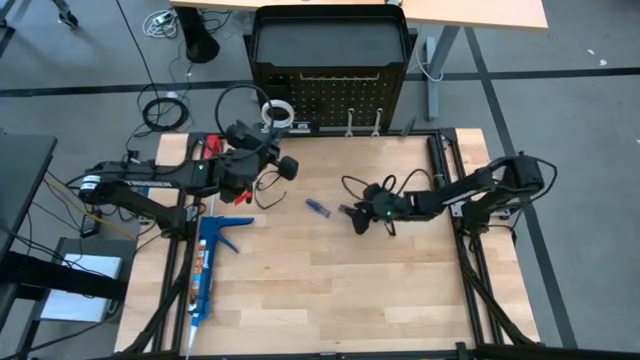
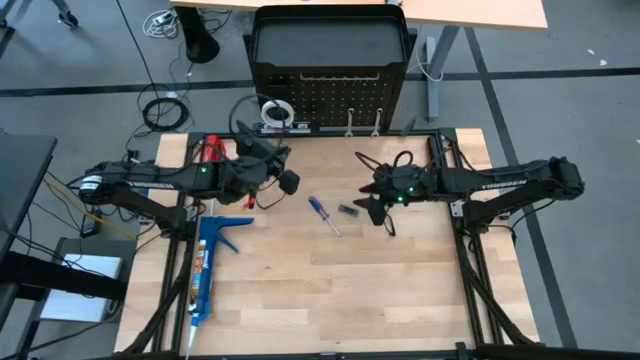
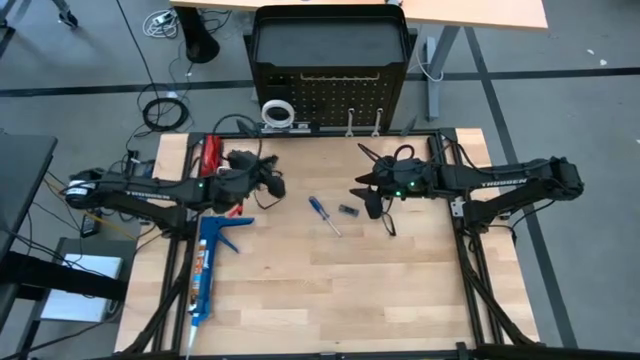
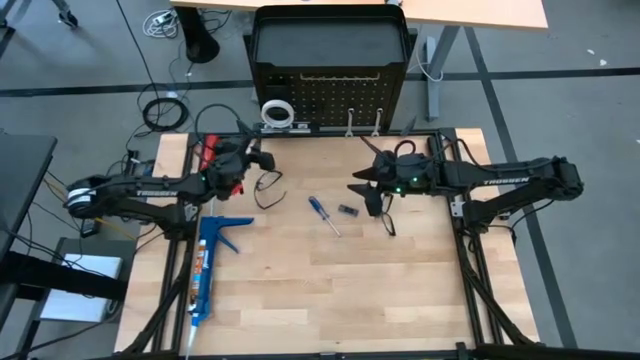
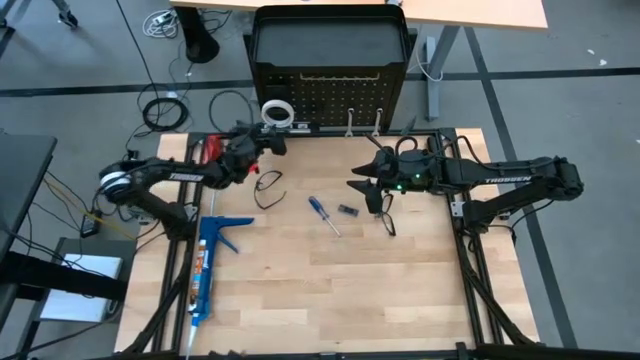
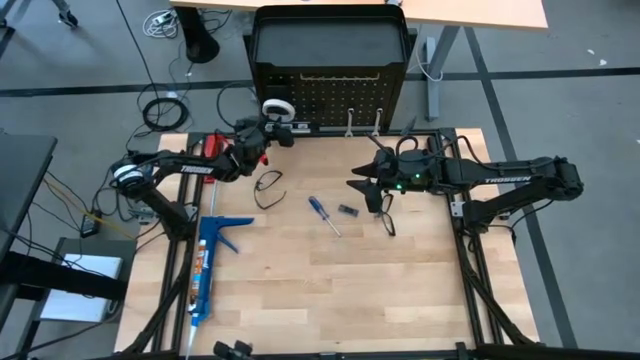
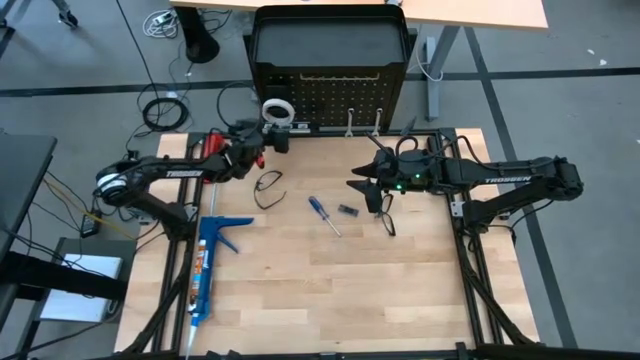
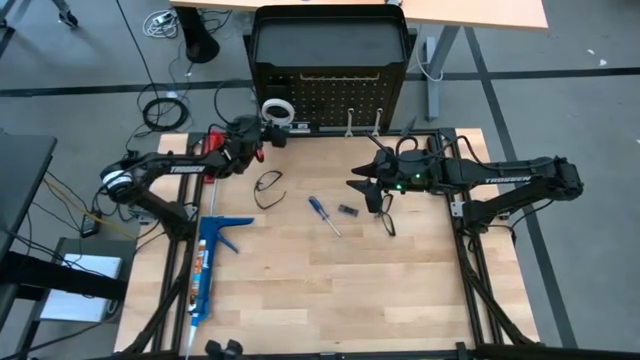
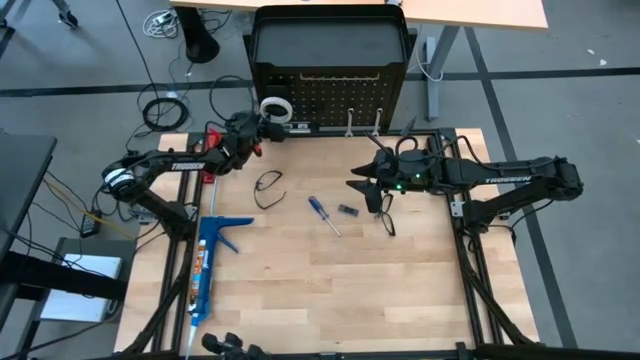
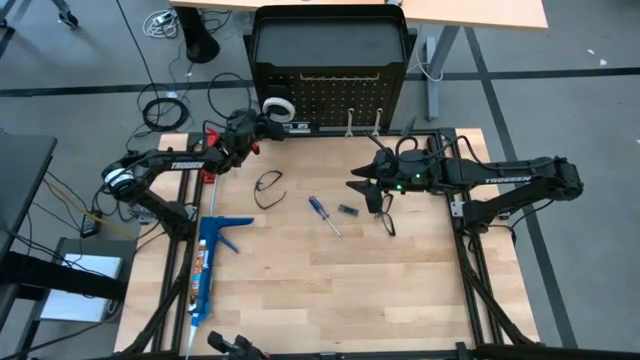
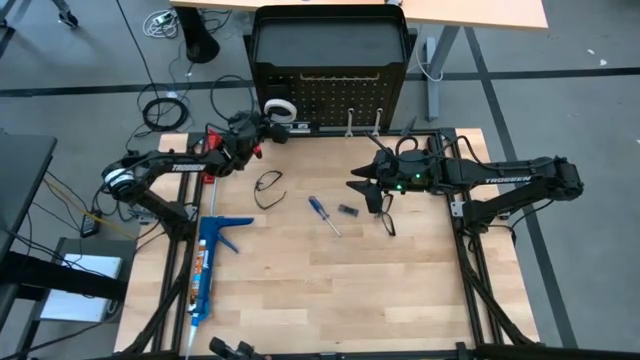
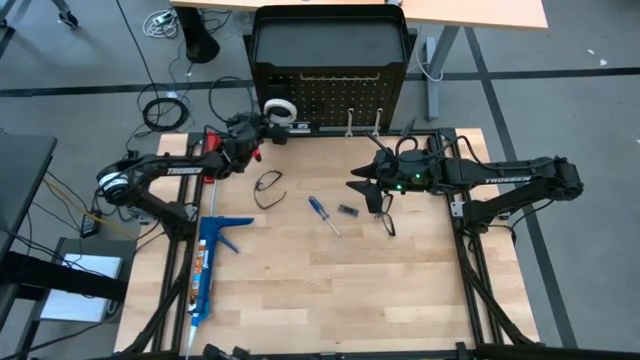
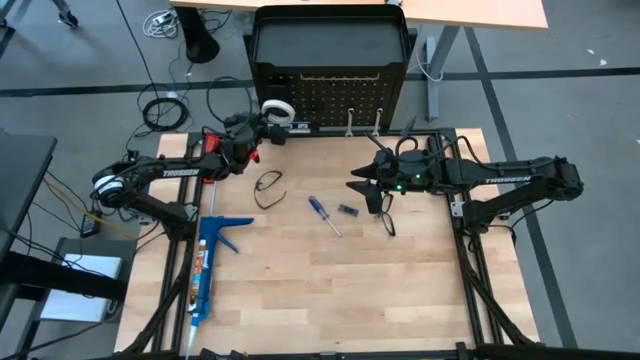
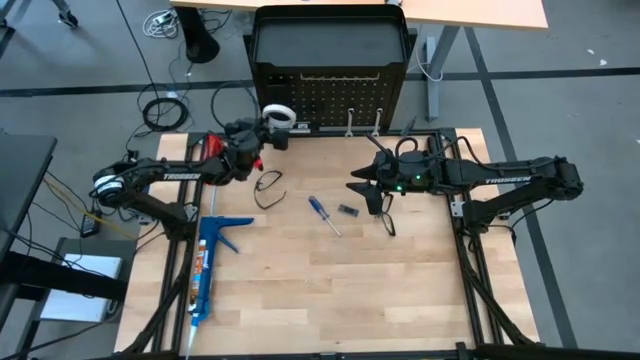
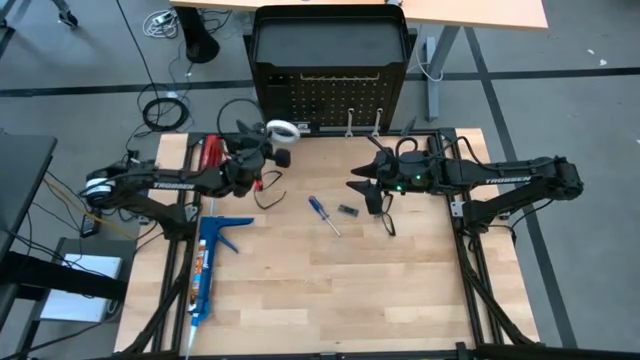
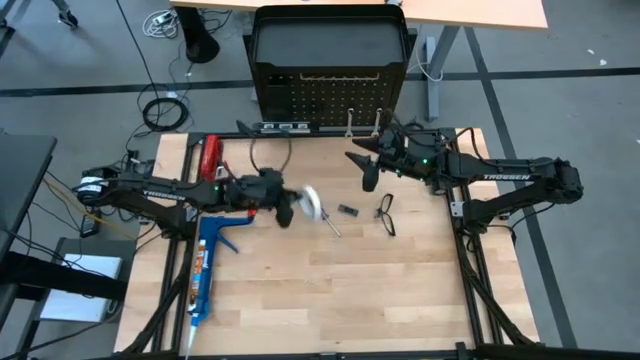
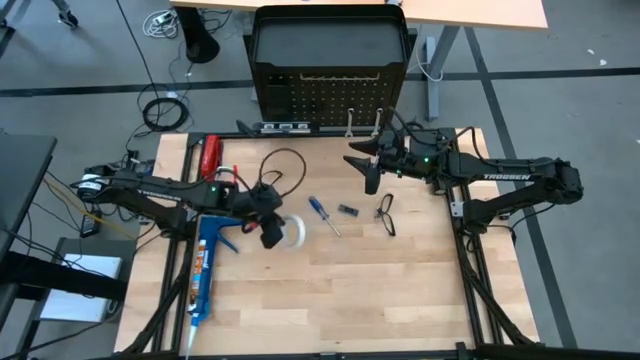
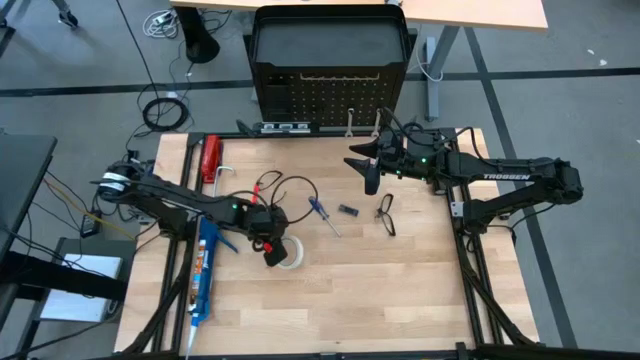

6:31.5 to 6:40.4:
Task: Hang tools onto peg board
Unhang the white masking tape from the black pegboard

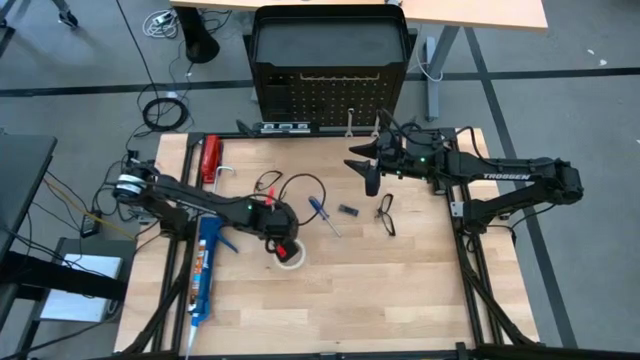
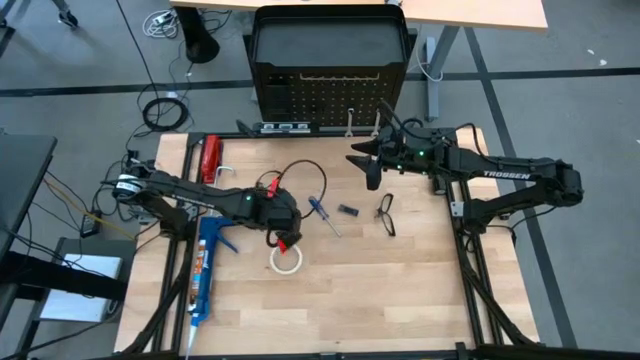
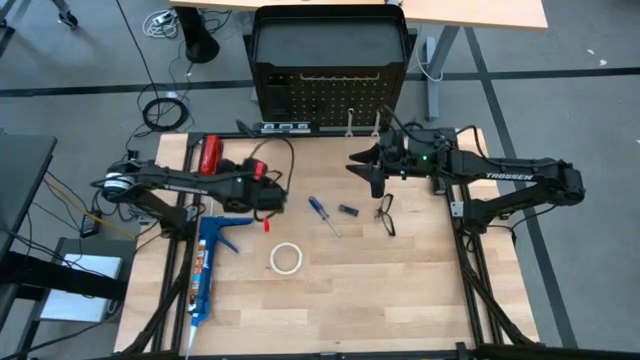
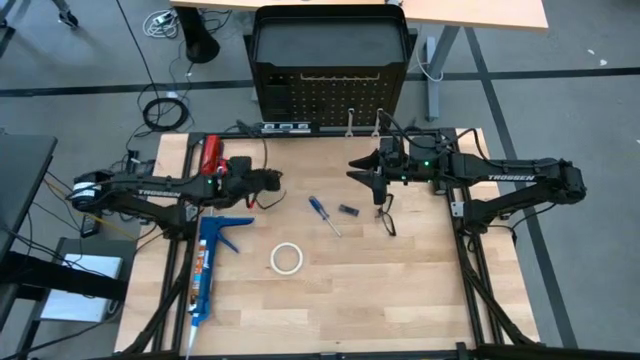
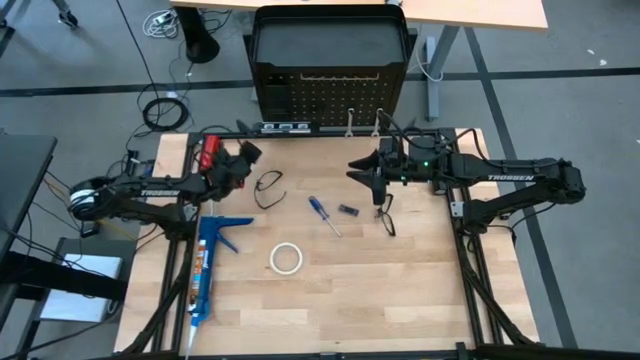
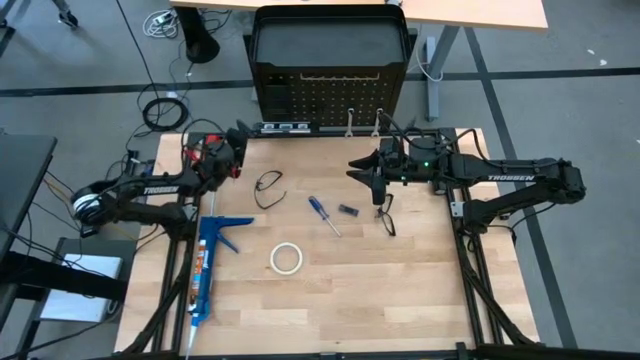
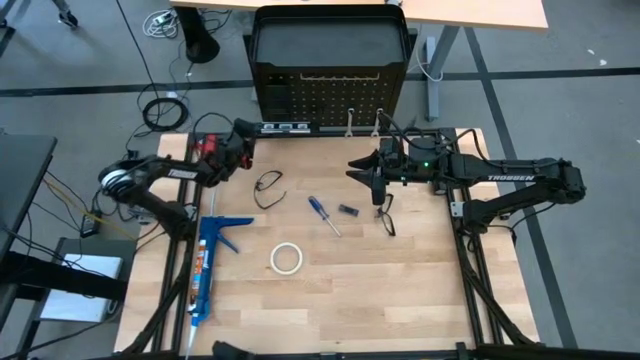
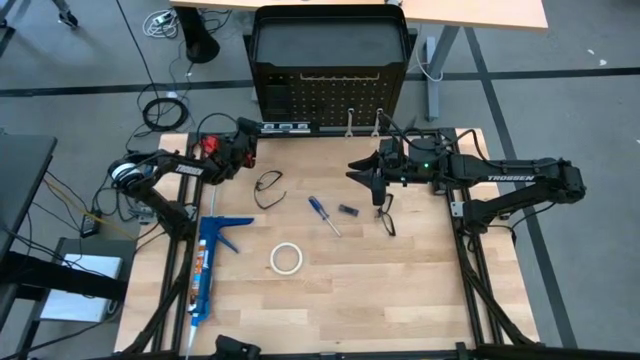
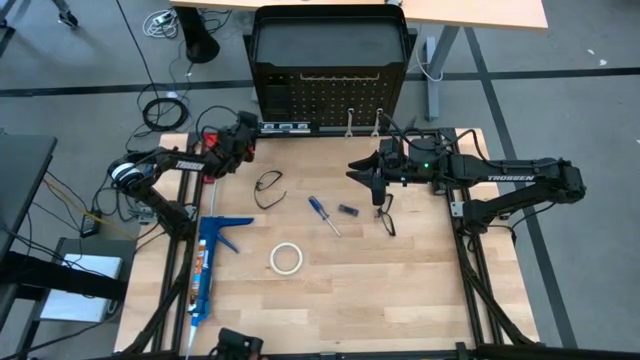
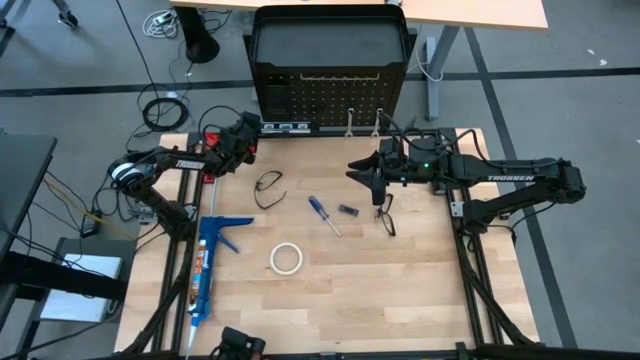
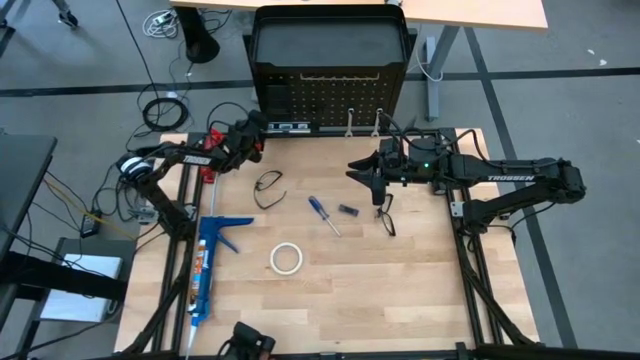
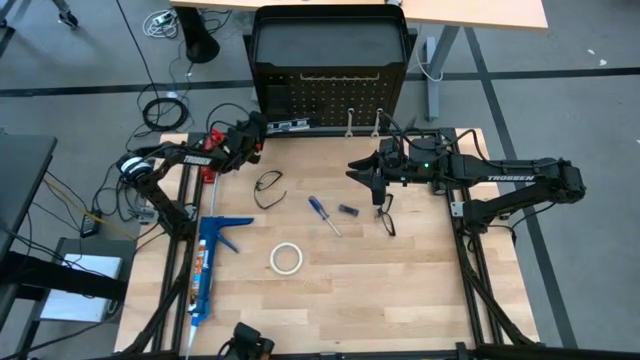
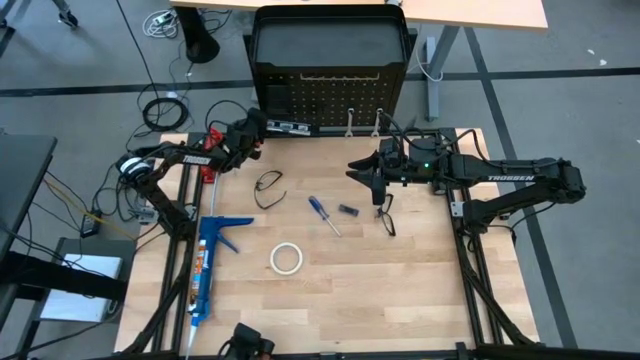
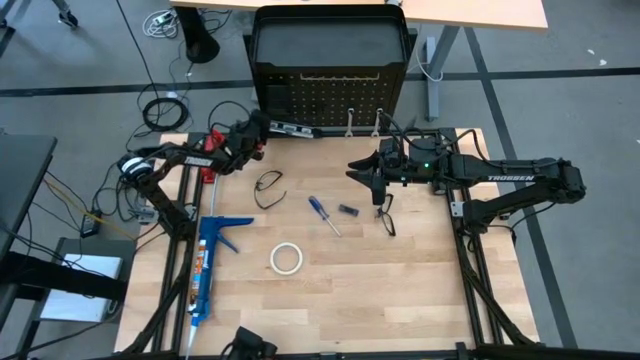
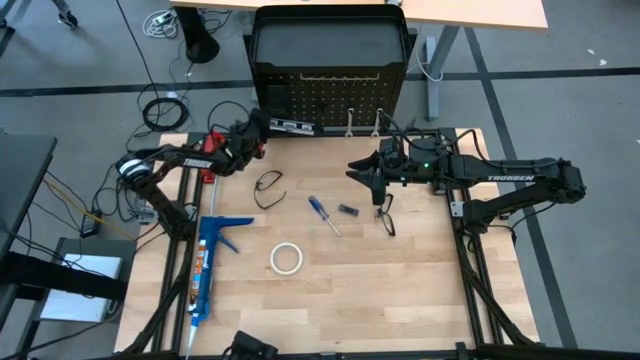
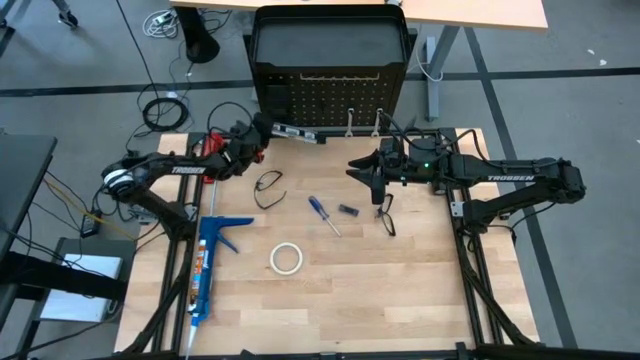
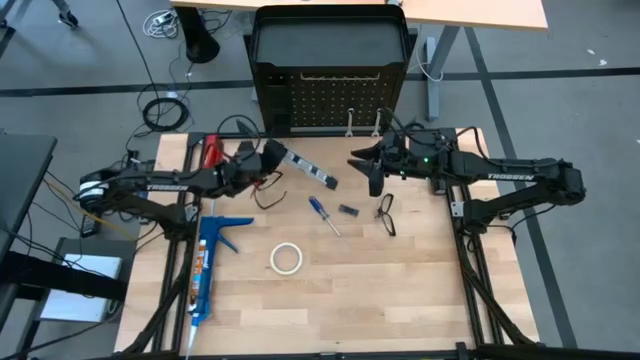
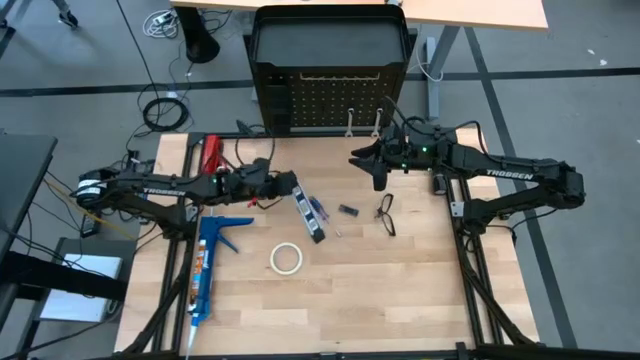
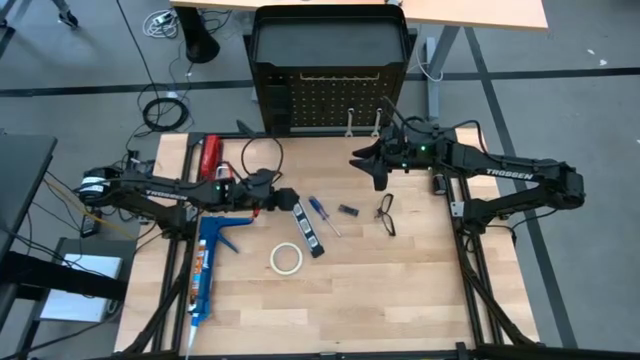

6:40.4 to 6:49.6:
Remove the spirit level from the black pegboard

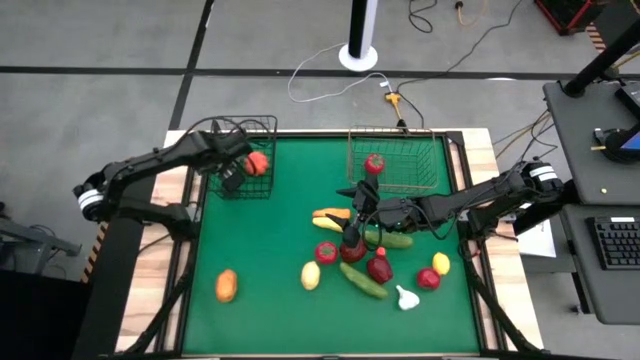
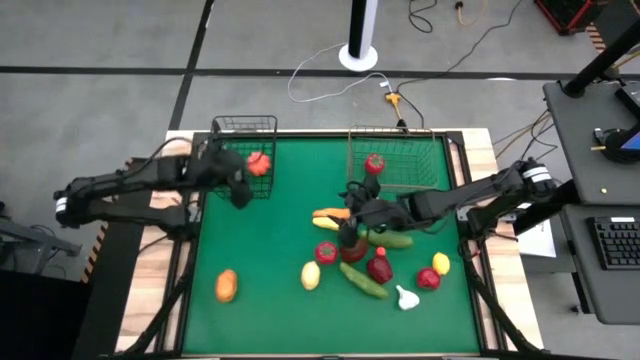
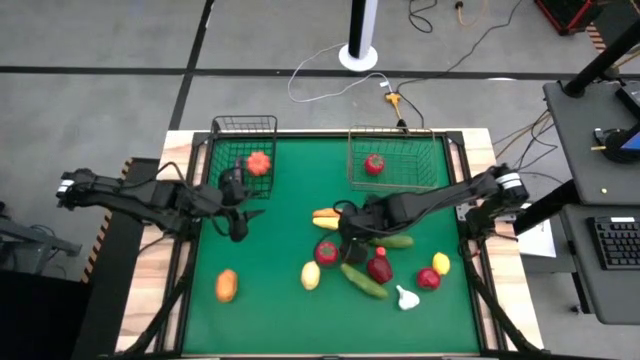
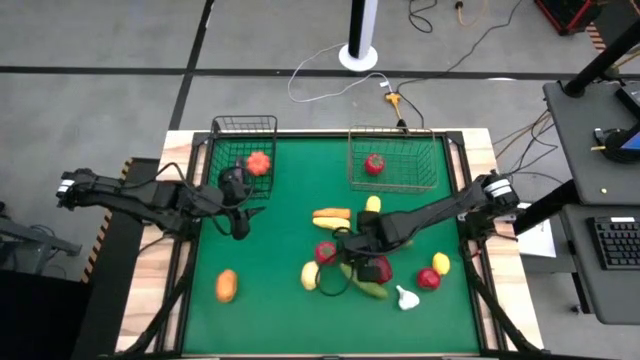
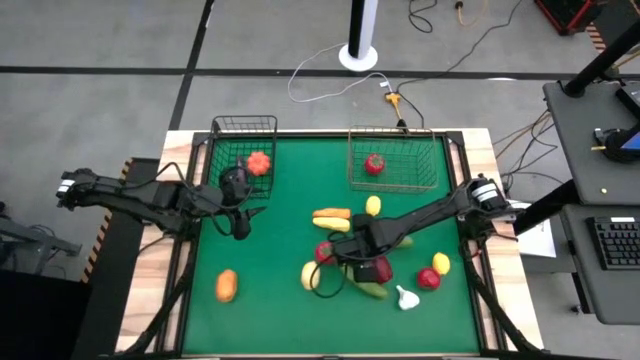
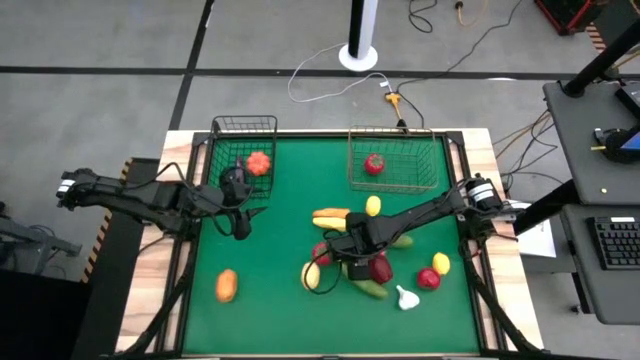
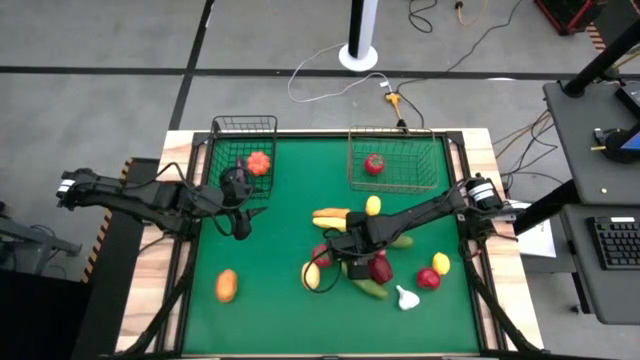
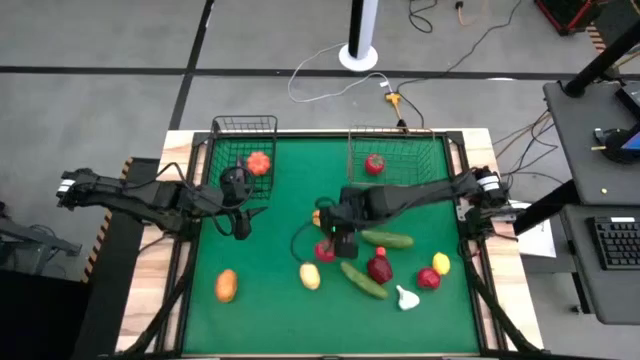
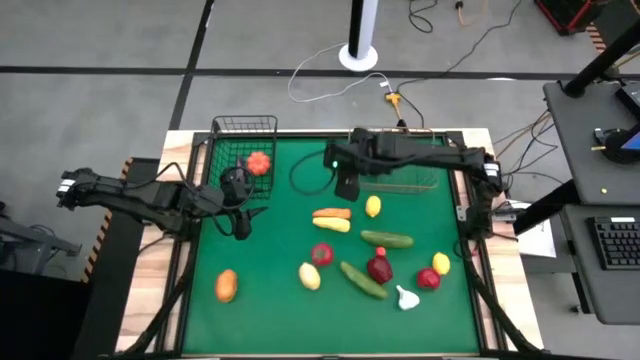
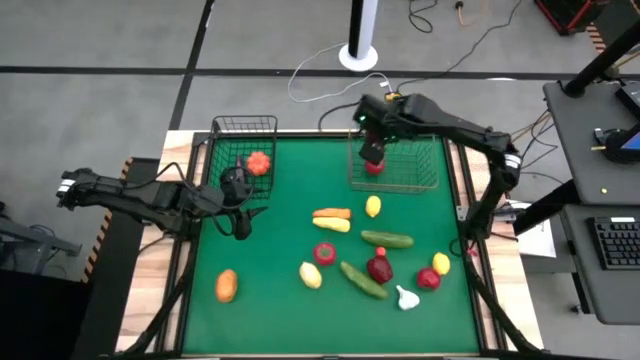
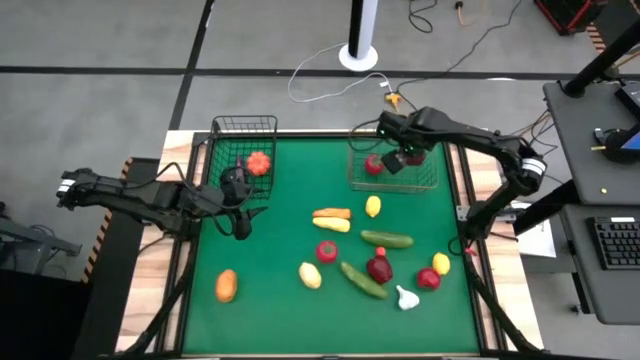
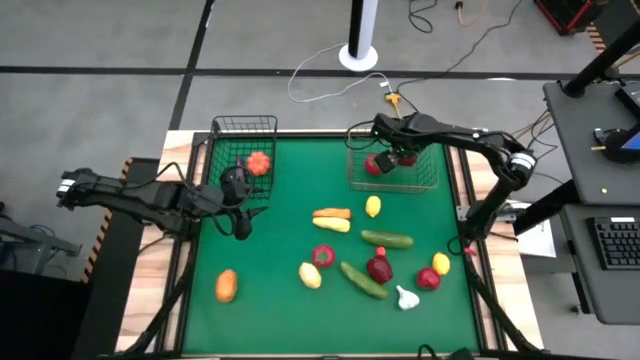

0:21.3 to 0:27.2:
Task: Sort produce into baskets
Put the left red apple into the right wire basket
